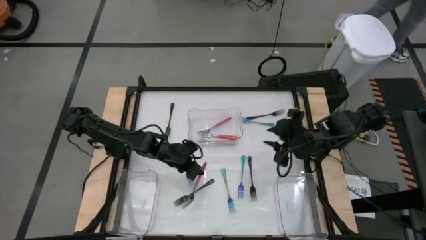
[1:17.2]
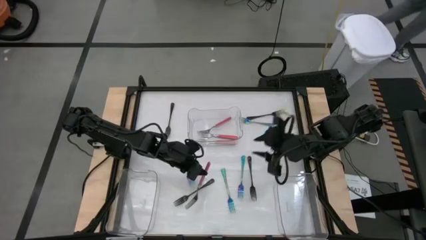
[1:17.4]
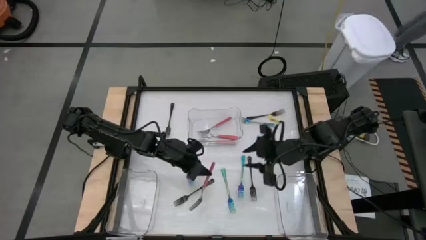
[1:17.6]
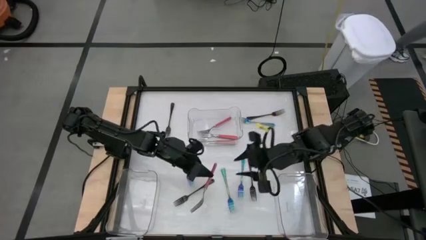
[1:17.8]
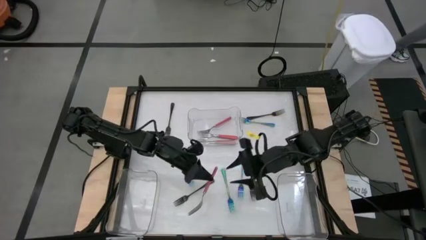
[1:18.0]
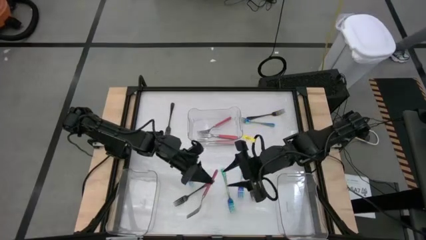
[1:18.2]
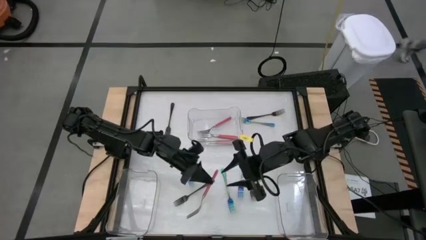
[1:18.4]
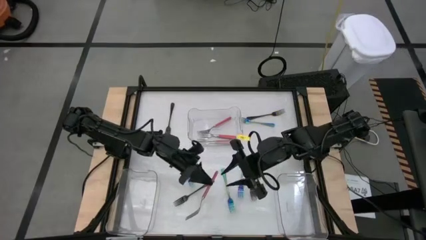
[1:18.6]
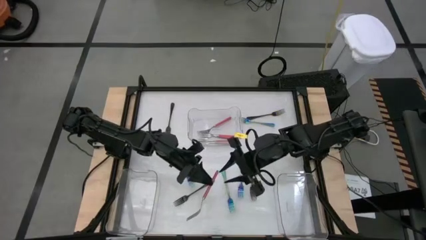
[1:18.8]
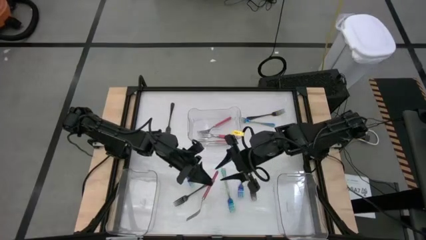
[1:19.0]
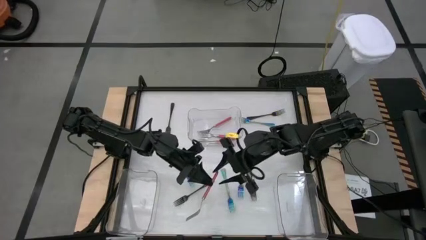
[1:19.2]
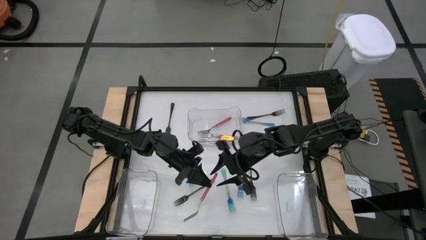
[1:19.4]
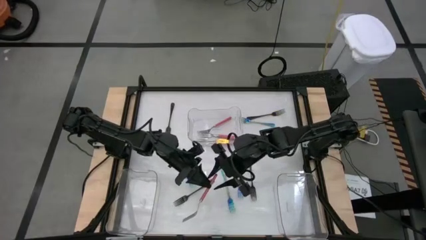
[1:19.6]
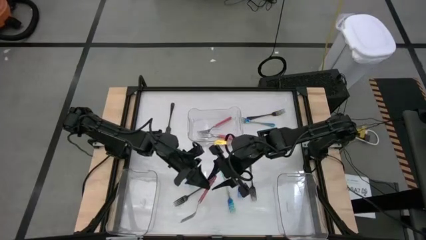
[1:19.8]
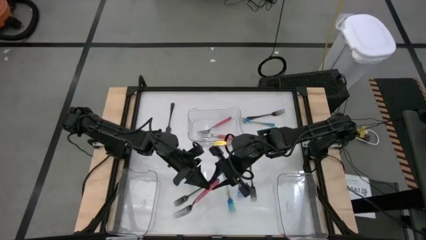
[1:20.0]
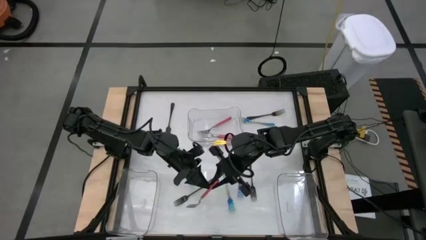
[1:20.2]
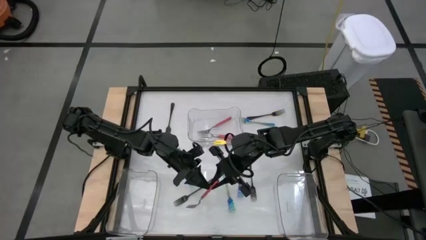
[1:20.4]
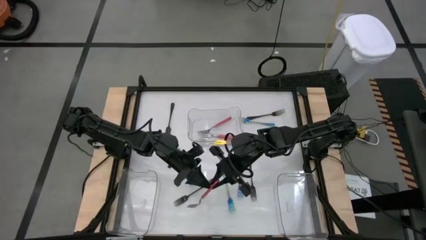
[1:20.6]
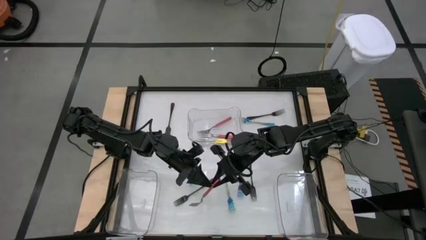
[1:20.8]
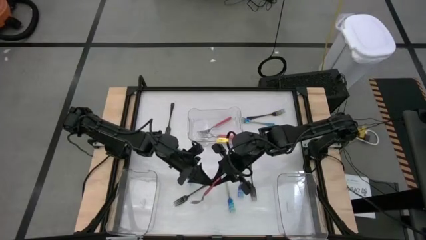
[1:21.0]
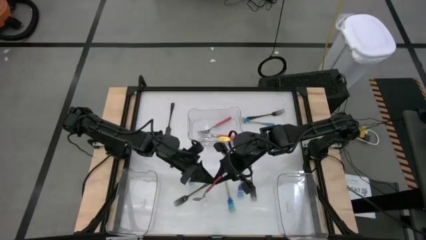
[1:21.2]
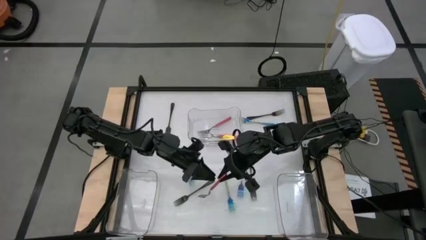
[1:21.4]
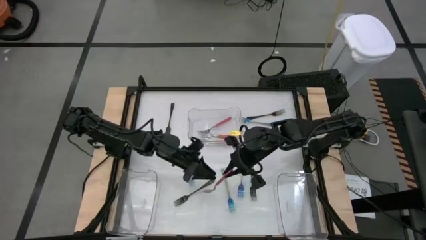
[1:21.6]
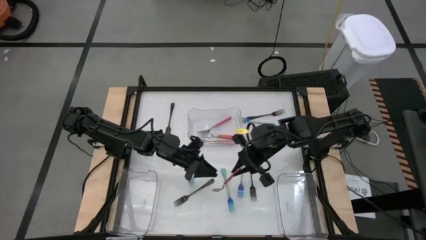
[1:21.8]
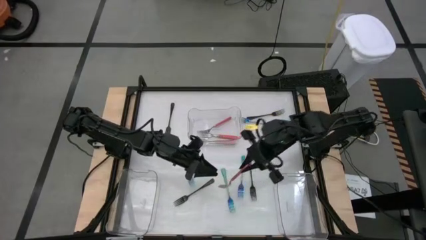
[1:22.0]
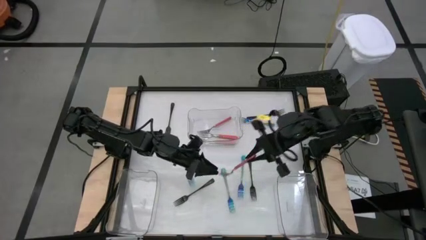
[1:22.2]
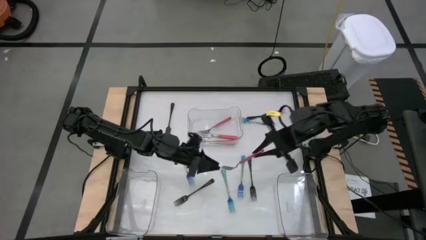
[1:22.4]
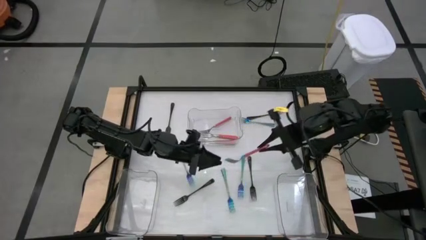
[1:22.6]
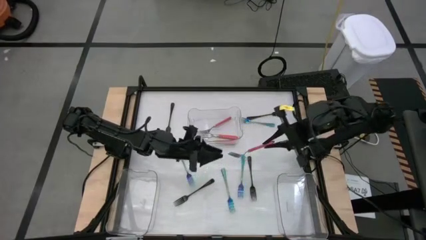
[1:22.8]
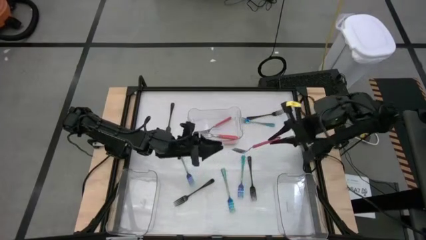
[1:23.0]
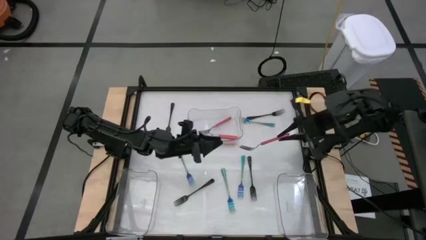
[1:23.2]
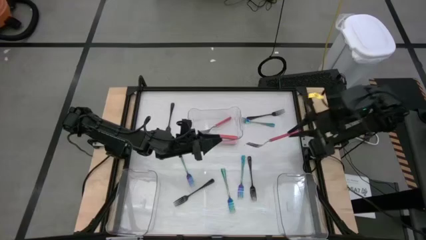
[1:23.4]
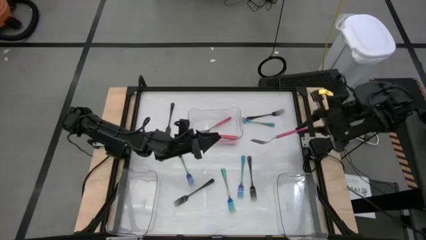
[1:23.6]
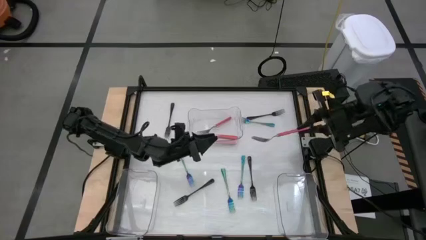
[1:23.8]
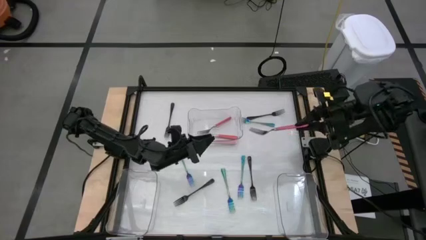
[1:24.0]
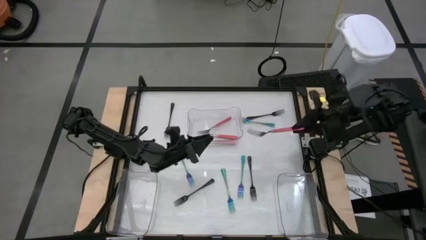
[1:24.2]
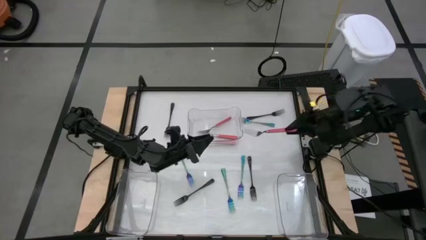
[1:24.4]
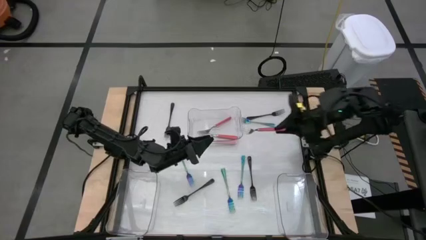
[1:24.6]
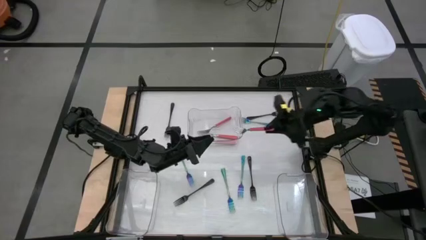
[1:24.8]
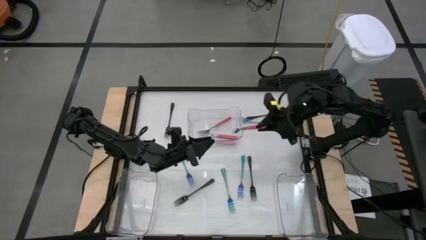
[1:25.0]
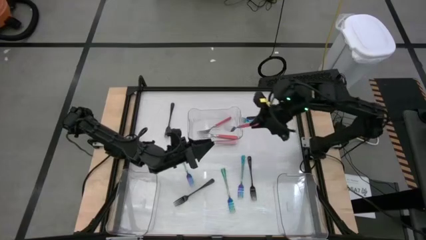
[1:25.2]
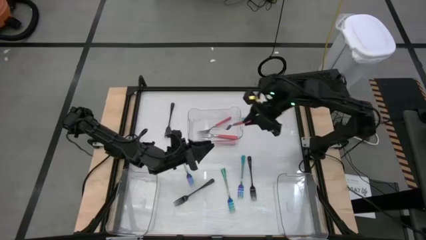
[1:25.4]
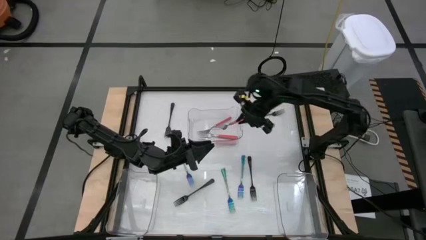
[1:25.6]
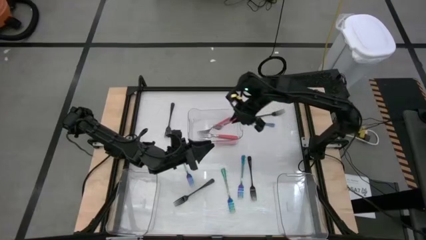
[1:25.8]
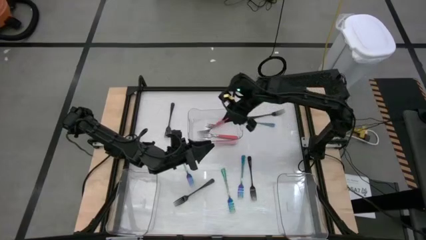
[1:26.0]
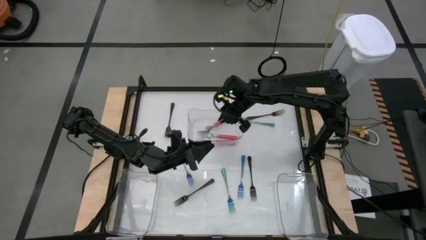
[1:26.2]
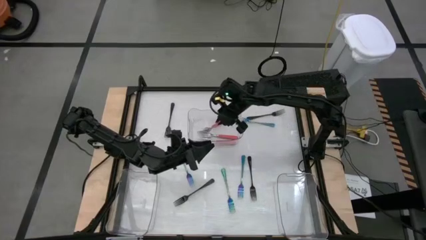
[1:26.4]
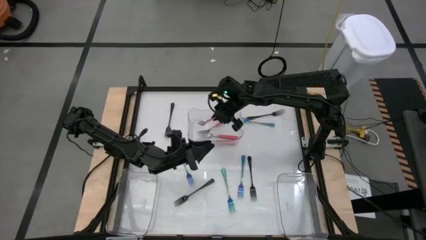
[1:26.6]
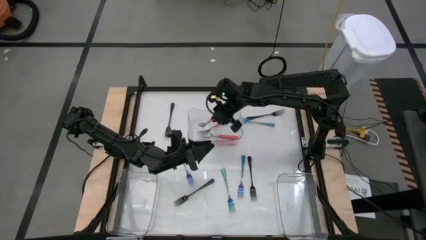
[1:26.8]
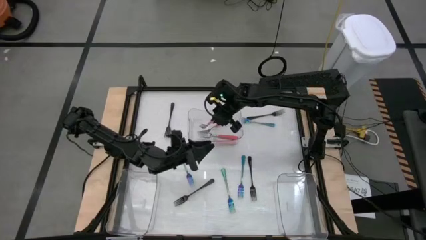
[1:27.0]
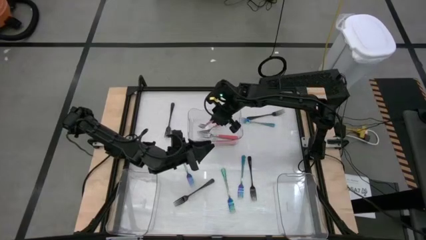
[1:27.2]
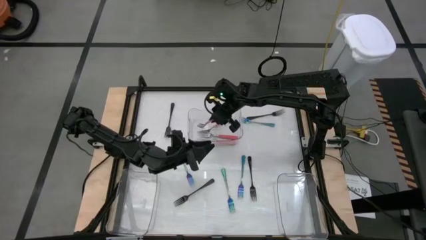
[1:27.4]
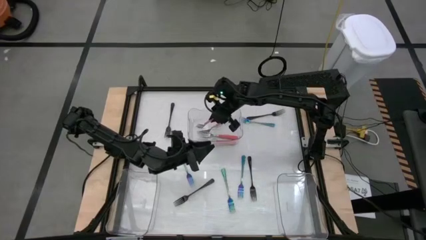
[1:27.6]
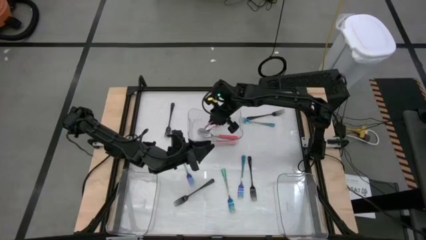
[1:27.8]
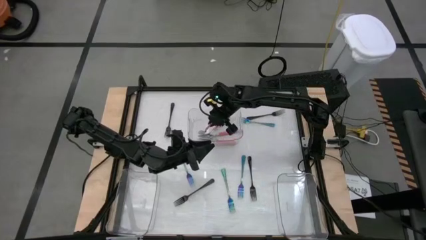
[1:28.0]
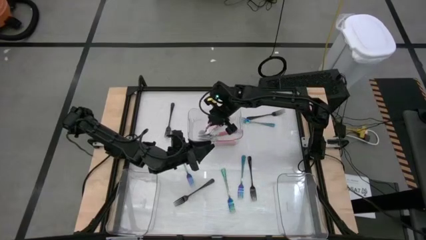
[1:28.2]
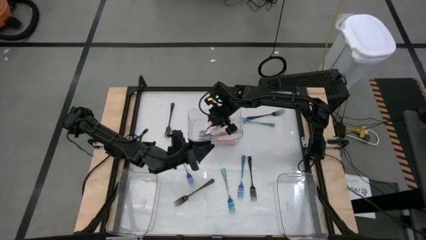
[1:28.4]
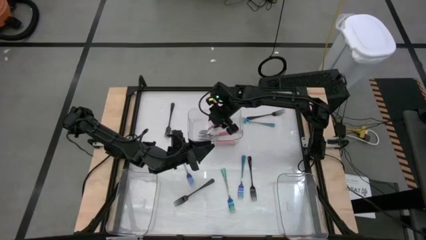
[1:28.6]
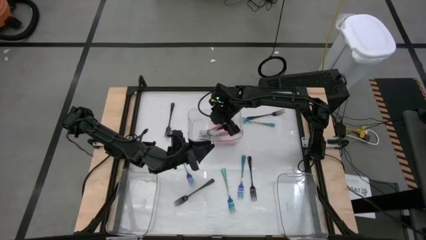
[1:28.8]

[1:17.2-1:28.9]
Task: Sort silverware by color (type)
Put the pink fork into the middle transparent bin
